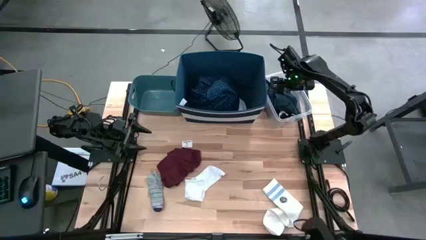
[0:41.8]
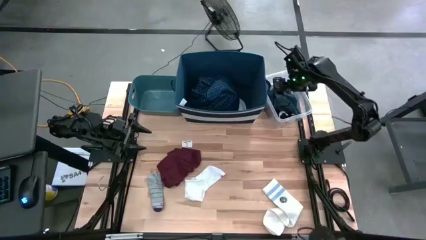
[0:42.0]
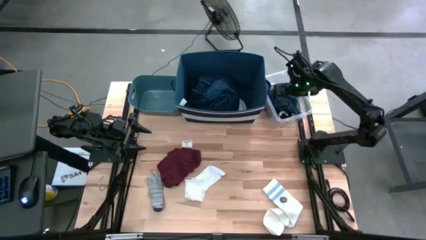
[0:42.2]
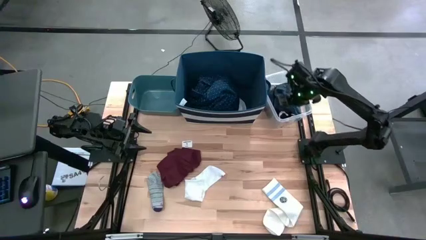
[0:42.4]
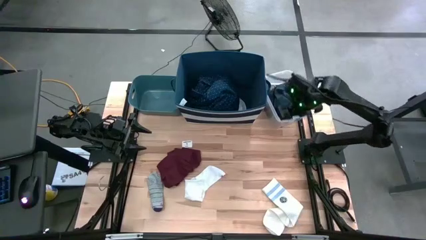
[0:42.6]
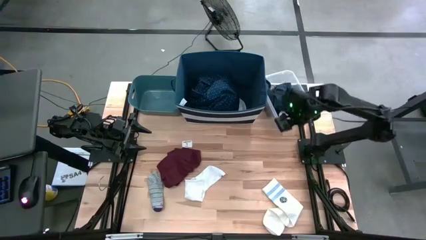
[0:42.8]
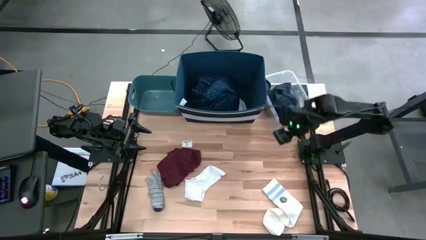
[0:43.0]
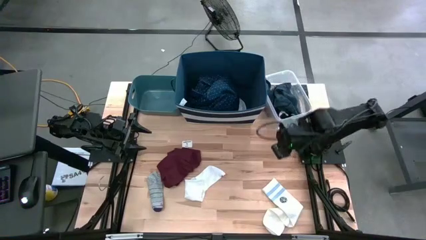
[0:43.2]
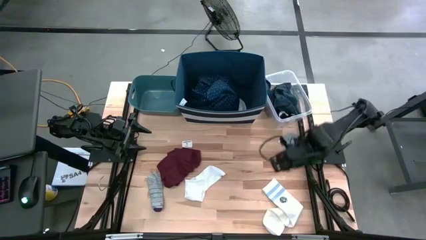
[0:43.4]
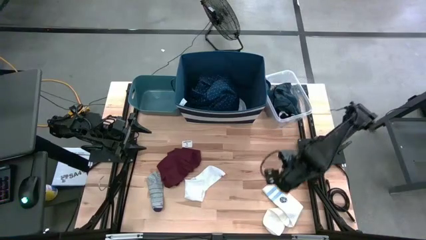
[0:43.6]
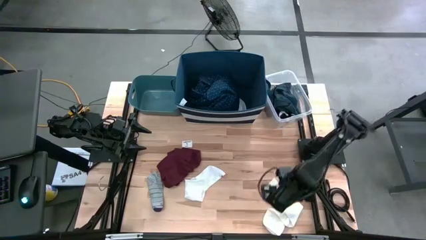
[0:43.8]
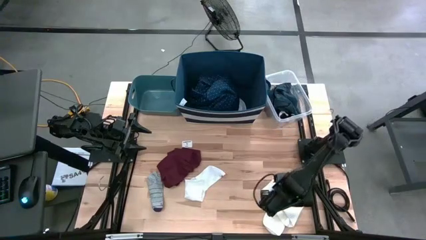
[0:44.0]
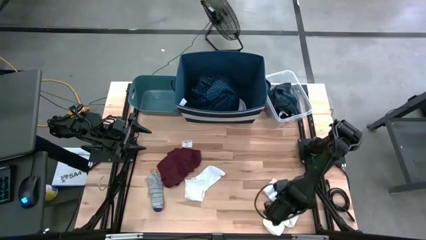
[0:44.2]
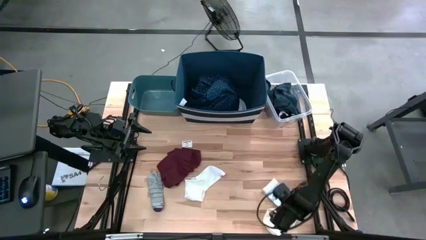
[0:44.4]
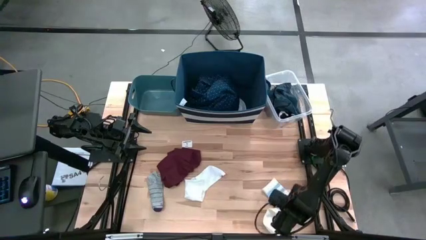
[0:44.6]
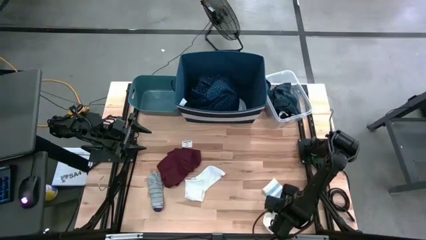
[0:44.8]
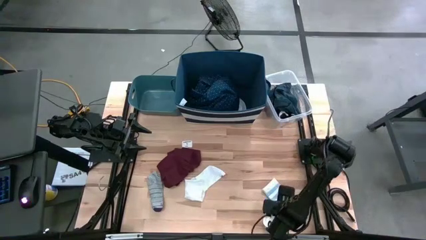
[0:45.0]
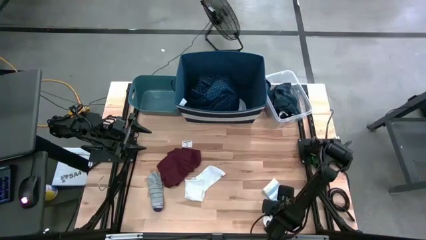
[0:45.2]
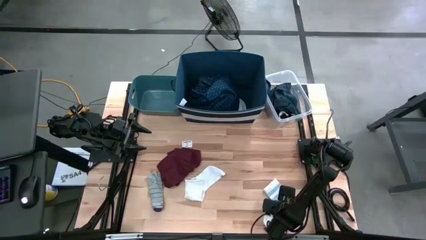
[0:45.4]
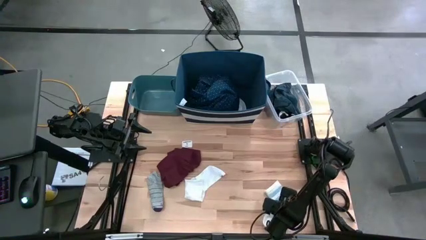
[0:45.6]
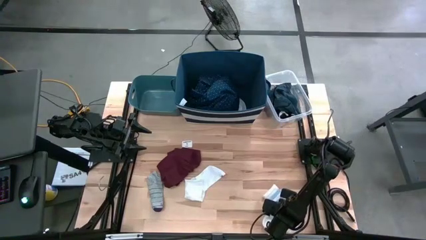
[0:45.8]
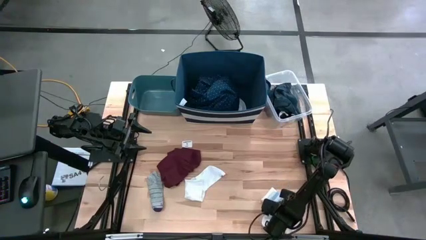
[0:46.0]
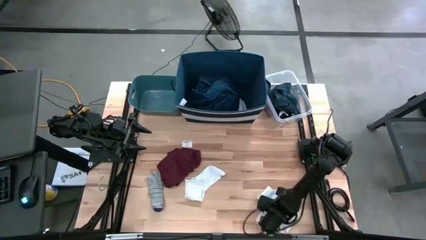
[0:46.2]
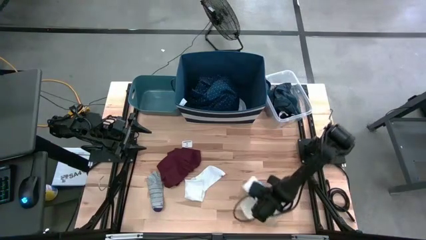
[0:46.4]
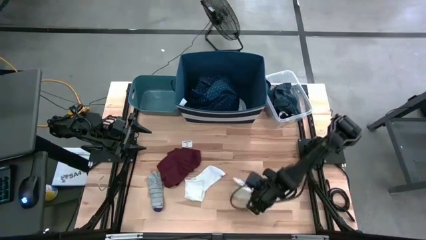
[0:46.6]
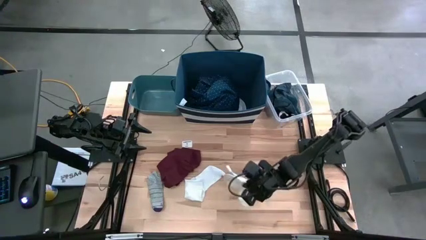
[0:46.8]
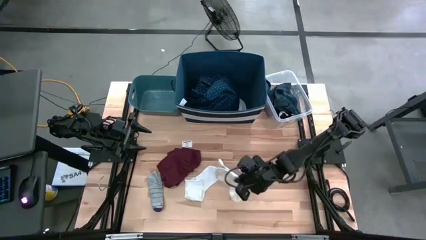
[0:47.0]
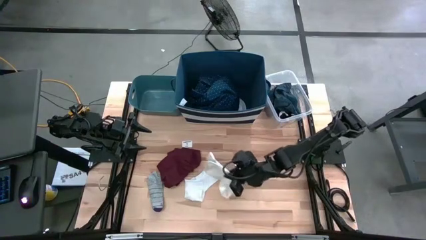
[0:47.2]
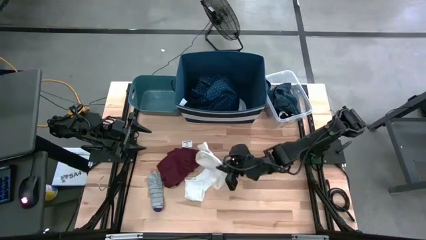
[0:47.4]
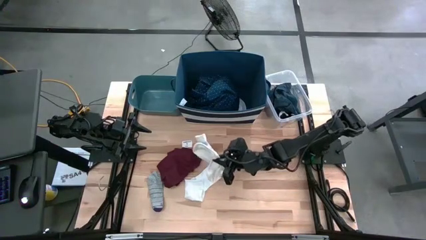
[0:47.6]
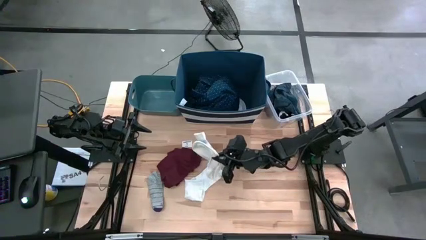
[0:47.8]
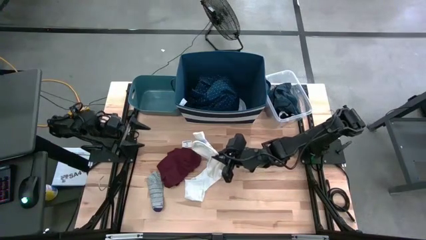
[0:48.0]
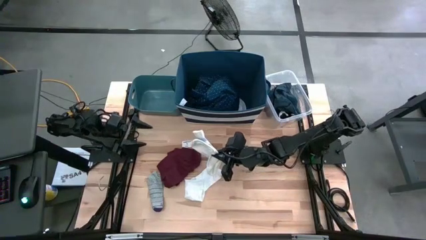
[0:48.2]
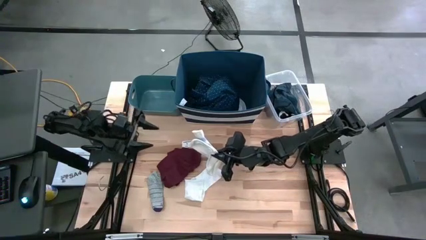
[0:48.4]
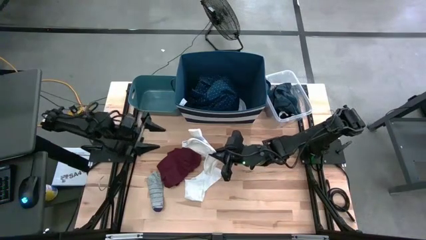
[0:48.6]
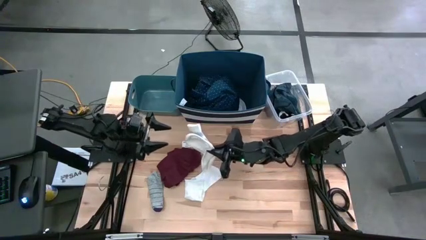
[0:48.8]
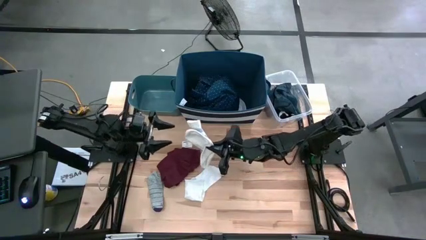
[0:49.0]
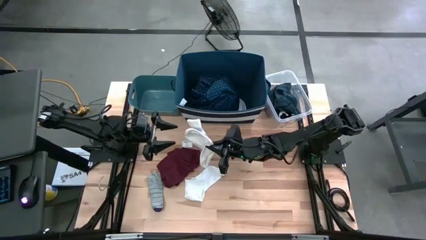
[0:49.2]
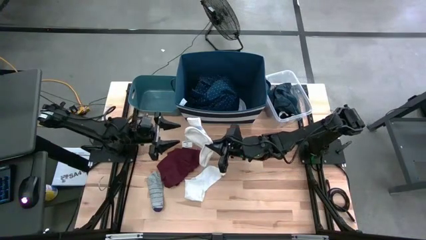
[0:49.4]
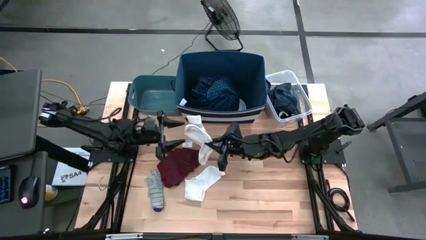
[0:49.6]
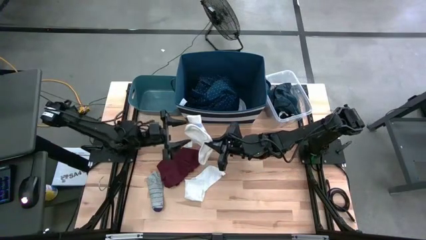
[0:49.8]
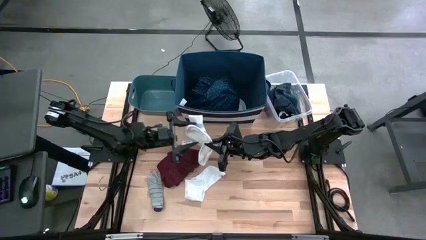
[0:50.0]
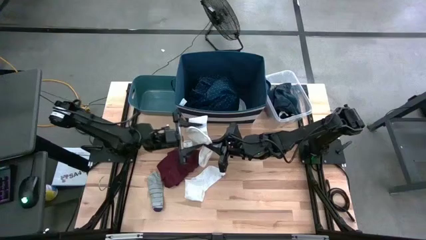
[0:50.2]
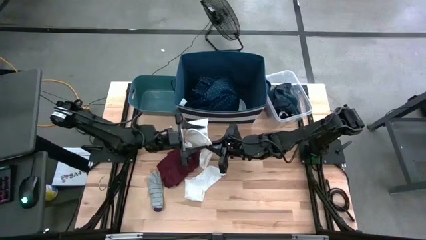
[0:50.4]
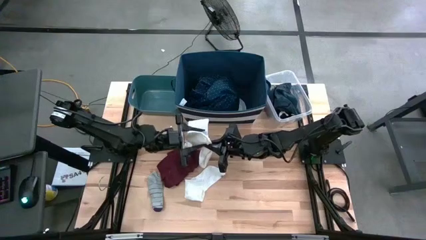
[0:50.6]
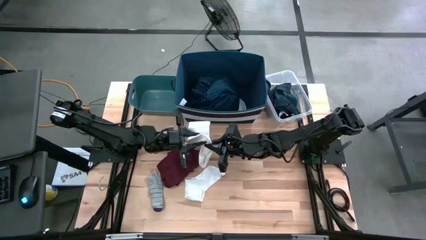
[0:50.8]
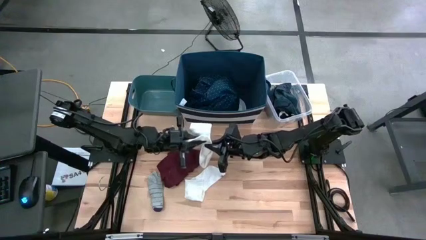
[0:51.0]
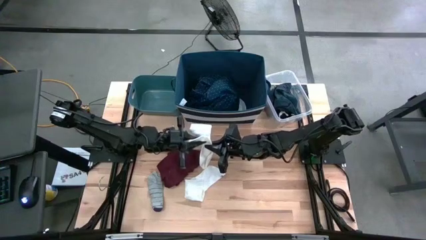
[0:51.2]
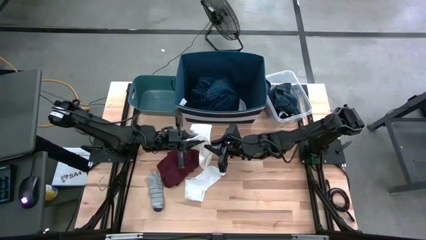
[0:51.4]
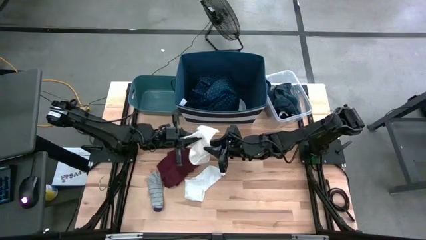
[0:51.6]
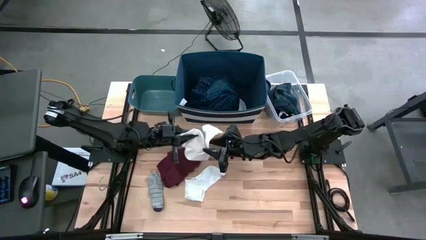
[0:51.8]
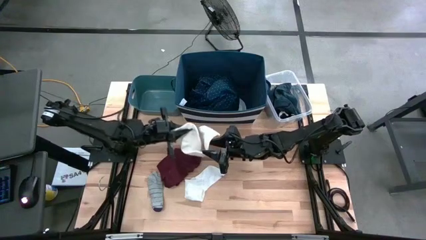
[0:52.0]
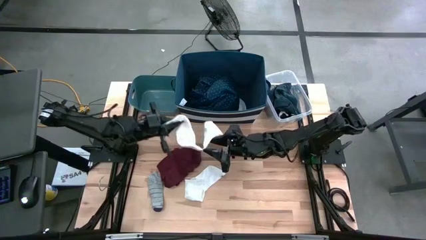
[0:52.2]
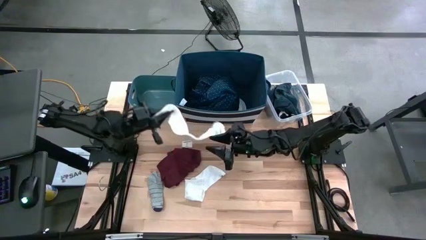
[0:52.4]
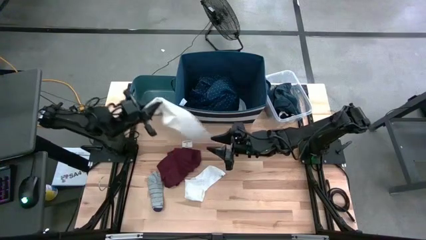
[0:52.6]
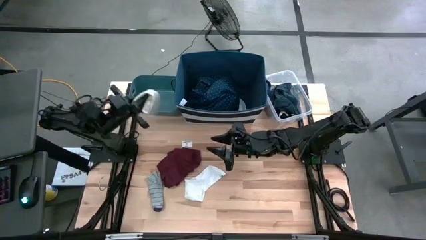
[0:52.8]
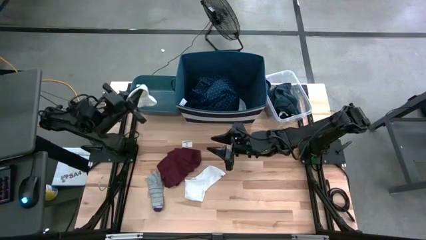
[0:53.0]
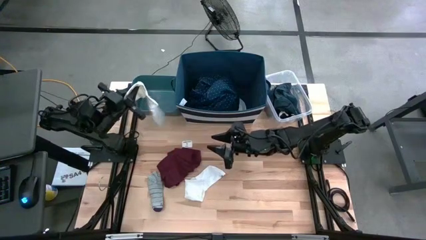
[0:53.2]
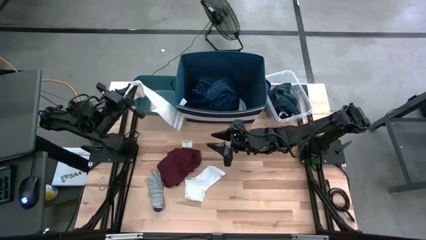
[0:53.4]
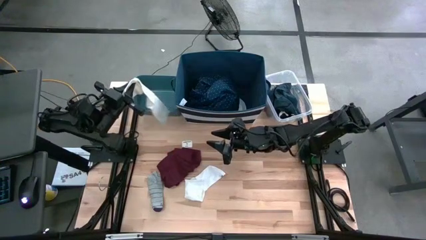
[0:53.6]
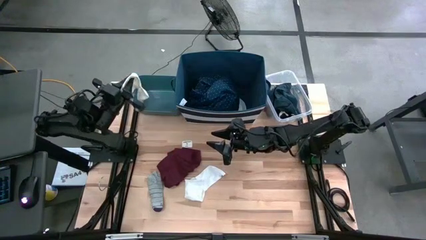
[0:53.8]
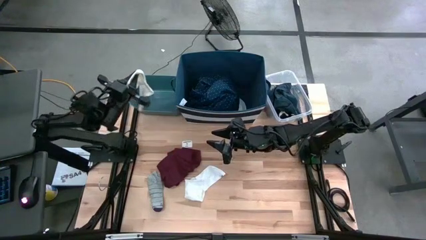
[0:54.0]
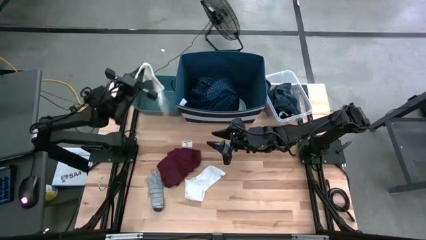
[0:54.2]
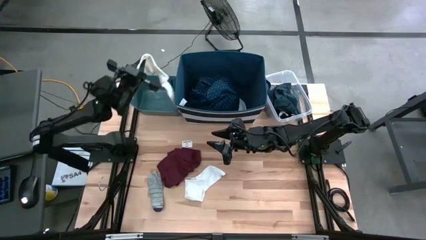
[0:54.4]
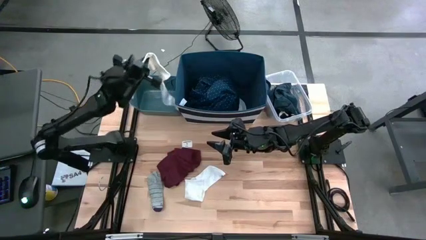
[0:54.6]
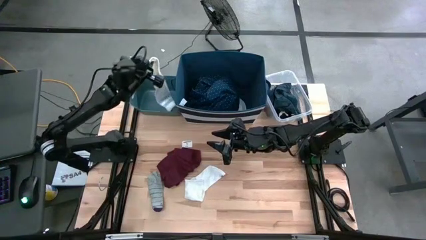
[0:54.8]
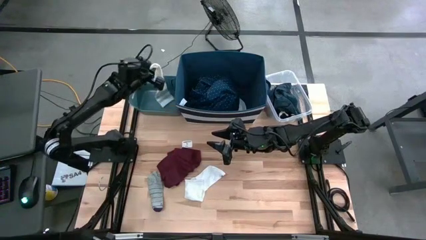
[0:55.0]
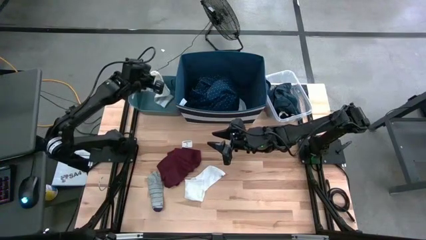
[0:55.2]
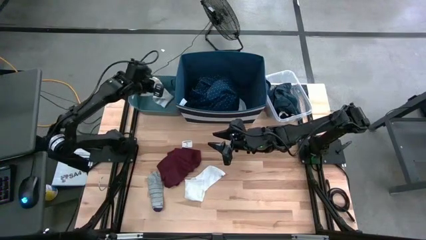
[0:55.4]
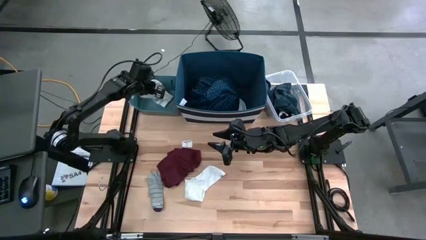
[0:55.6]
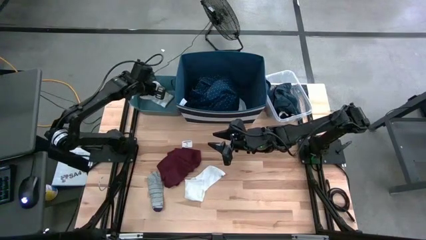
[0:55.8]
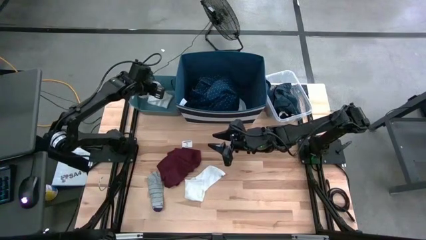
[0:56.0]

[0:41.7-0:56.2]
Task: Pick & Place Cloths
Put the white sock into the green bin

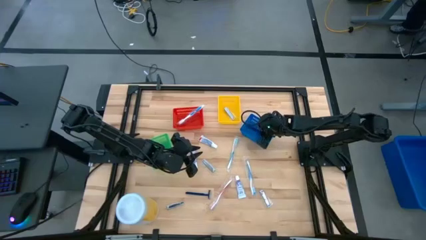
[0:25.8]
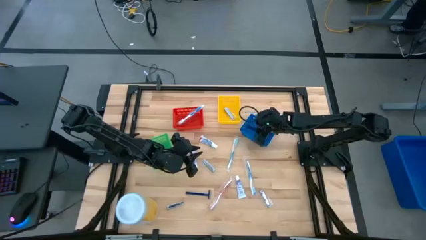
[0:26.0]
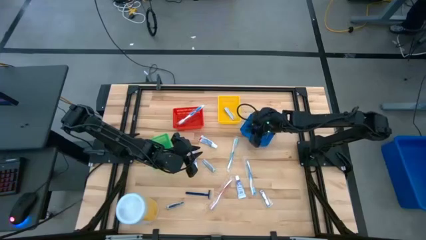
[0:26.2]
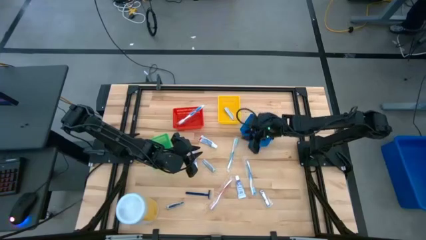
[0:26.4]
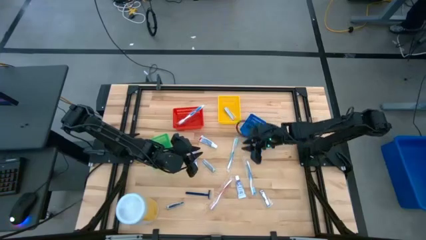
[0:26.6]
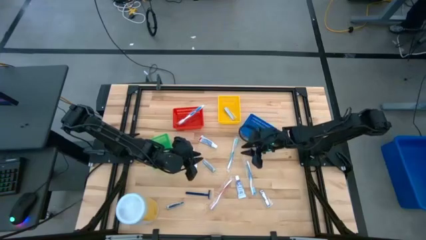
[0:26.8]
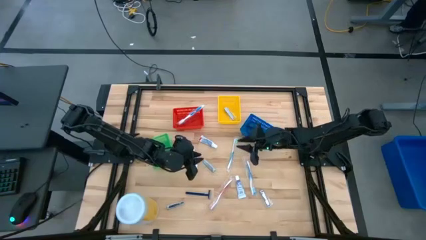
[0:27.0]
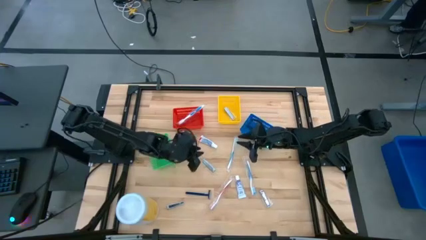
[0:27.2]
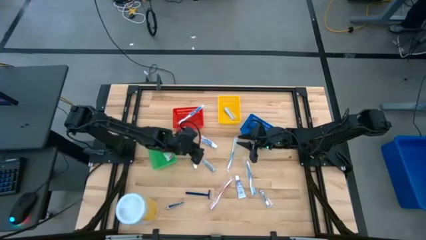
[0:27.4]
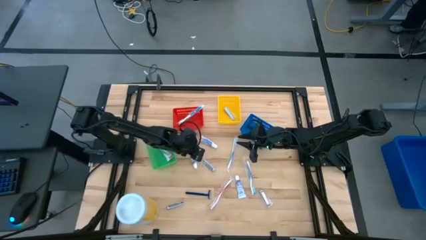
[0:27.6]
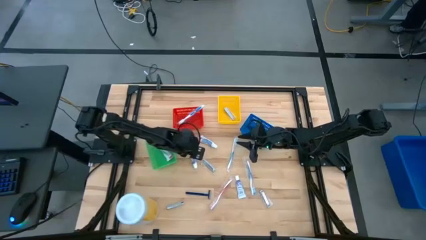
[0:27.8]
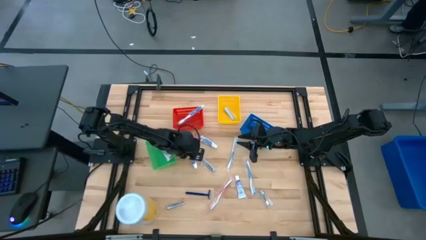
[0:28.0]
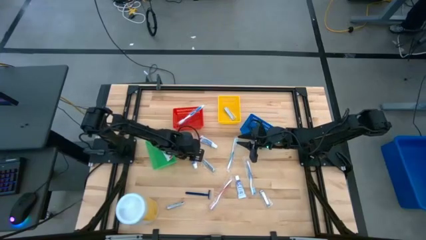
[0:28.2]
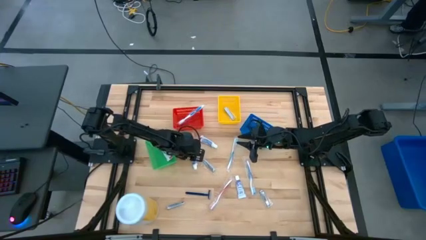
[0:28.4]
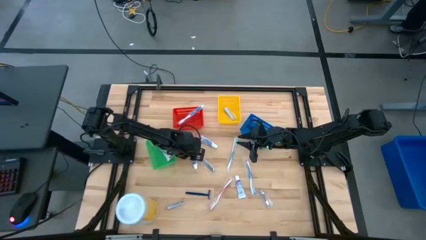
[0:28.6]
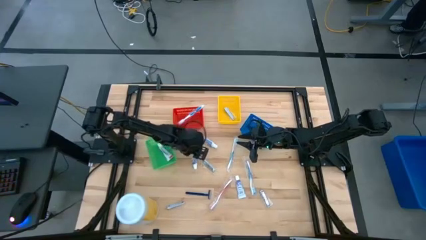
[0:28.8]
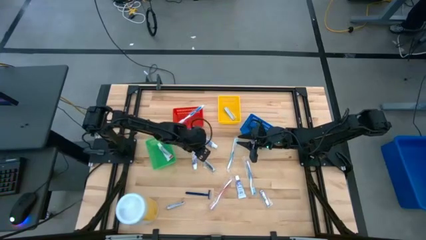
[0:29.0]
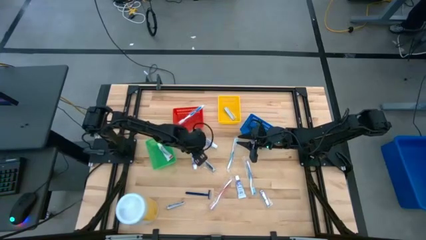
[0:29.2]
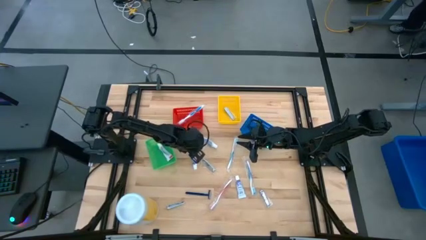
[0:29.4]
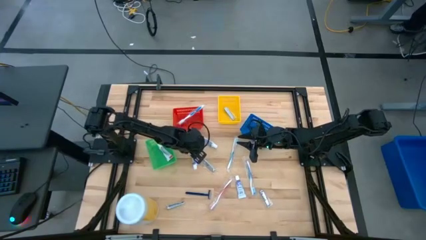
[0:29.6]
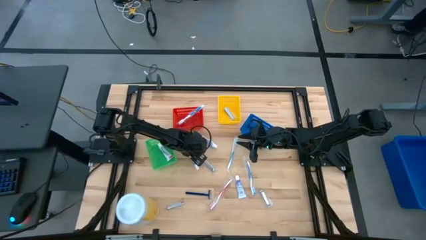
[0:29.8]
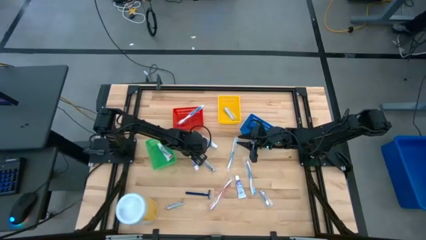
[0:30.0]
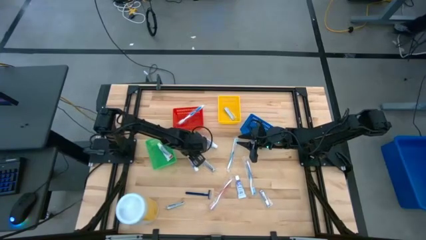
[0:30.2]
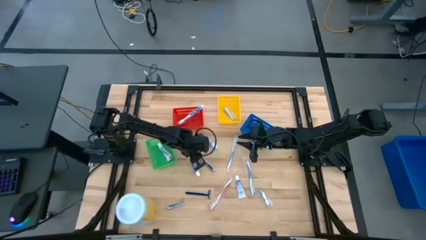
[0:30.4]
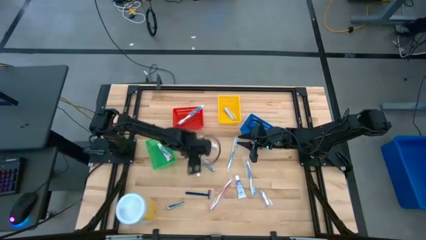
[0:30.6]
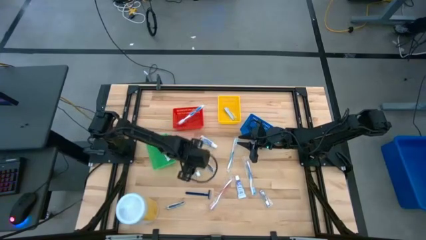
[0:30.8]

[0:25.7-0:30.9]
Task: Pick & Place Travel size toiletries
Put the white toothpaste into the green bin
